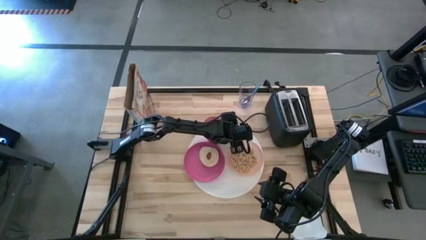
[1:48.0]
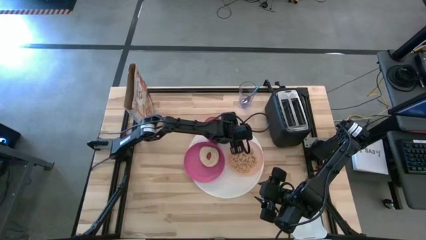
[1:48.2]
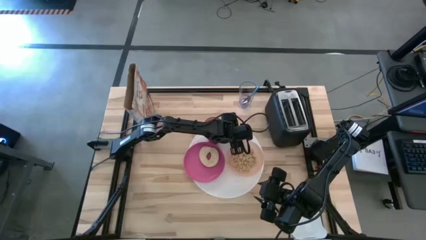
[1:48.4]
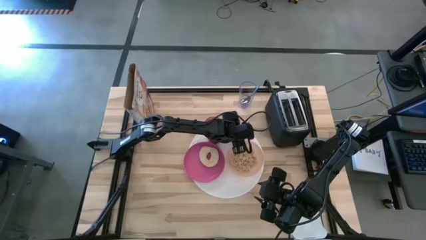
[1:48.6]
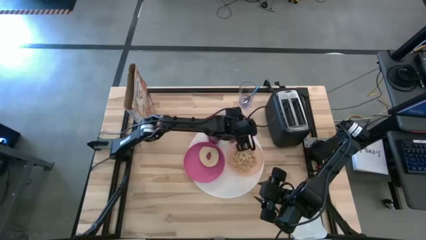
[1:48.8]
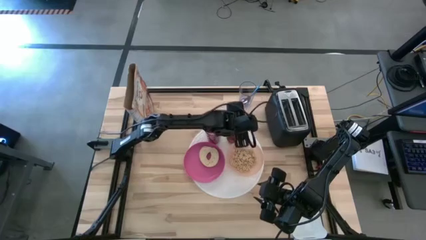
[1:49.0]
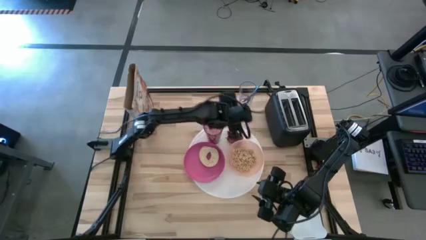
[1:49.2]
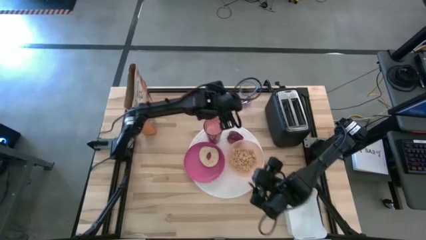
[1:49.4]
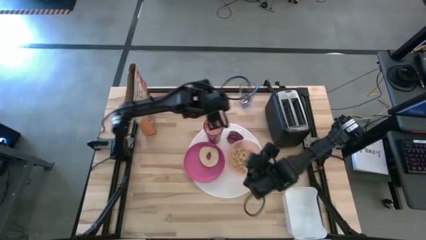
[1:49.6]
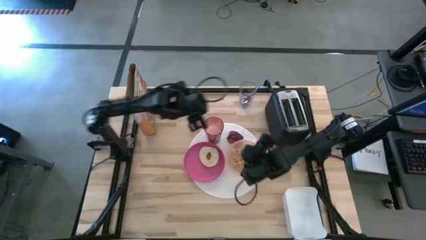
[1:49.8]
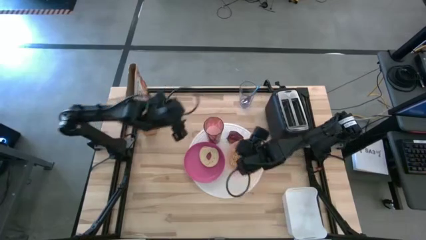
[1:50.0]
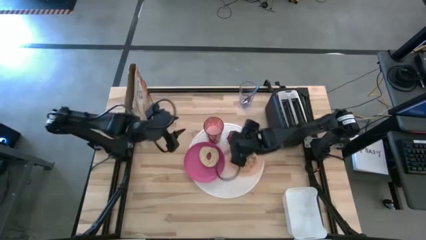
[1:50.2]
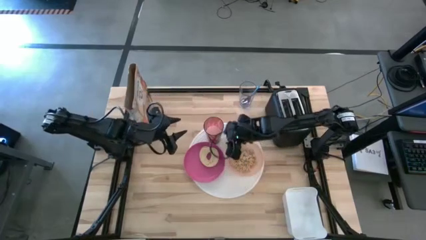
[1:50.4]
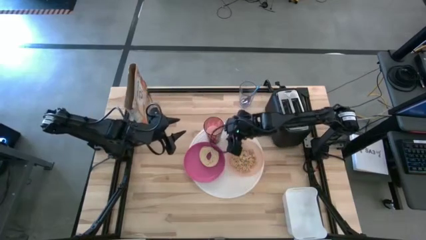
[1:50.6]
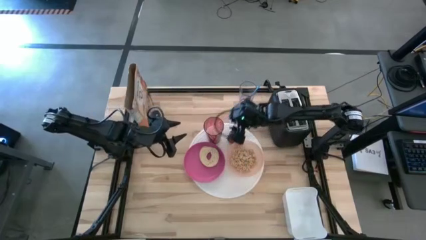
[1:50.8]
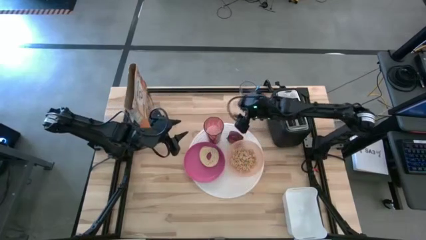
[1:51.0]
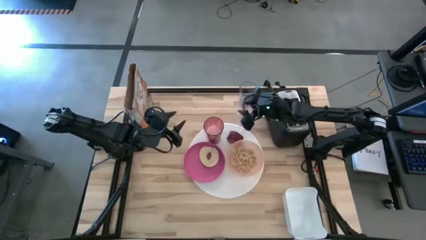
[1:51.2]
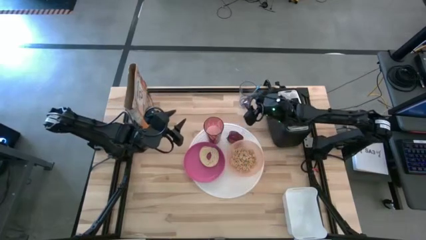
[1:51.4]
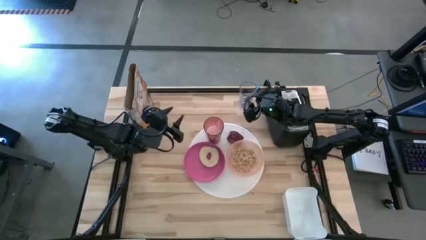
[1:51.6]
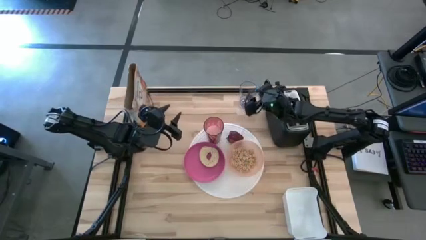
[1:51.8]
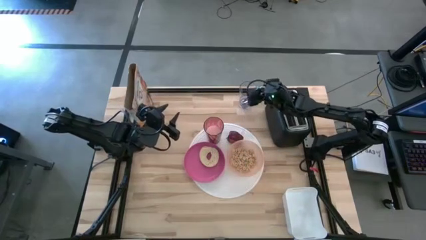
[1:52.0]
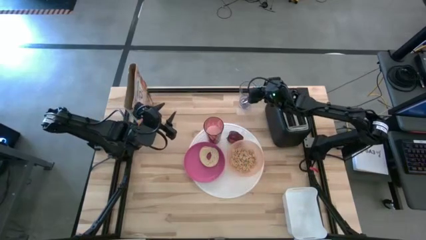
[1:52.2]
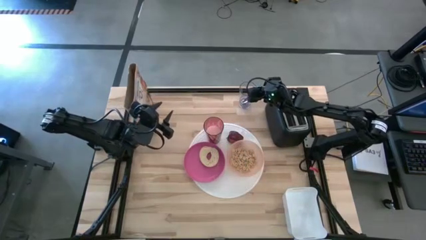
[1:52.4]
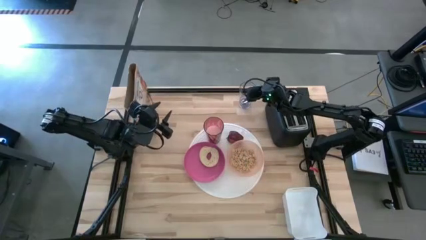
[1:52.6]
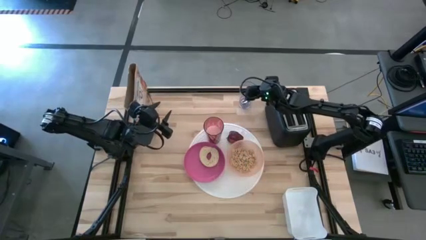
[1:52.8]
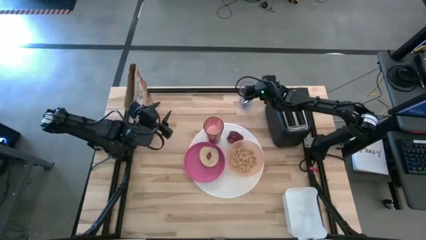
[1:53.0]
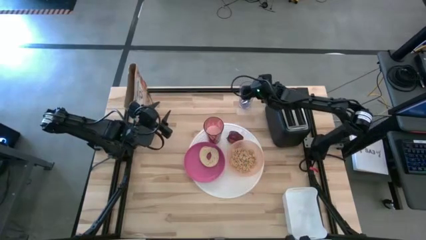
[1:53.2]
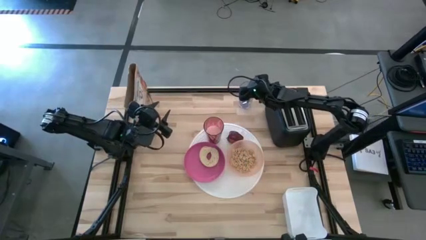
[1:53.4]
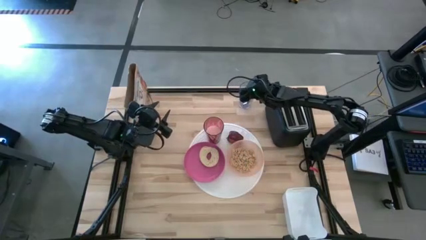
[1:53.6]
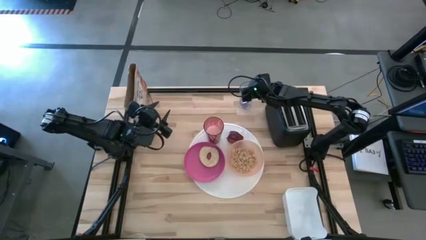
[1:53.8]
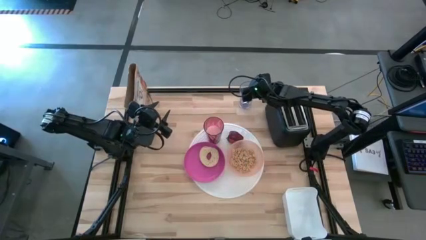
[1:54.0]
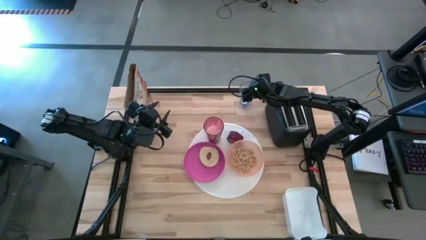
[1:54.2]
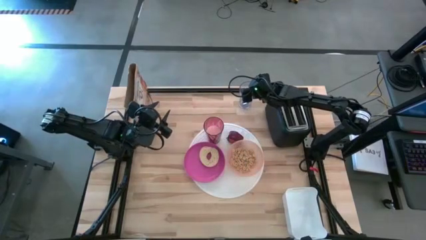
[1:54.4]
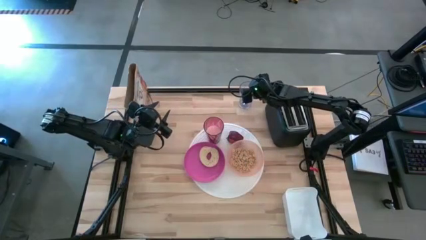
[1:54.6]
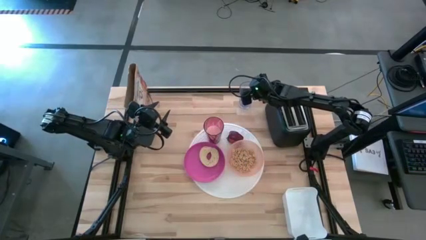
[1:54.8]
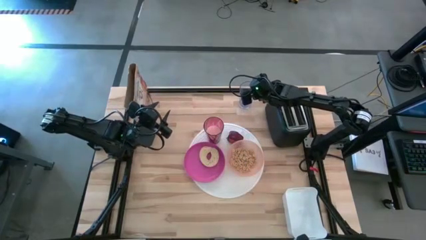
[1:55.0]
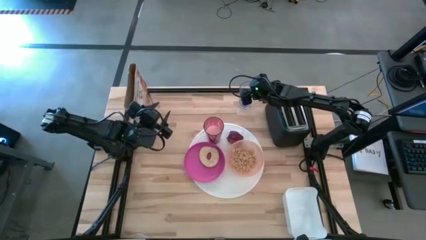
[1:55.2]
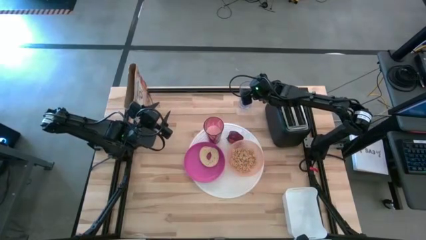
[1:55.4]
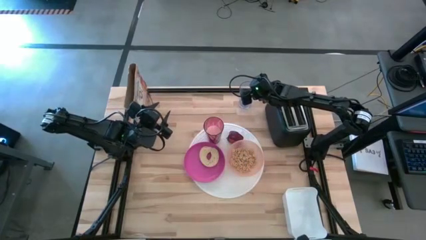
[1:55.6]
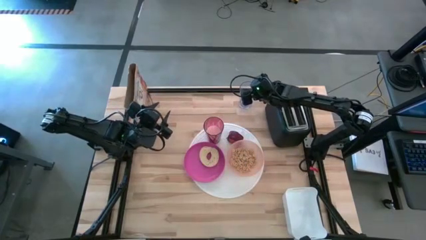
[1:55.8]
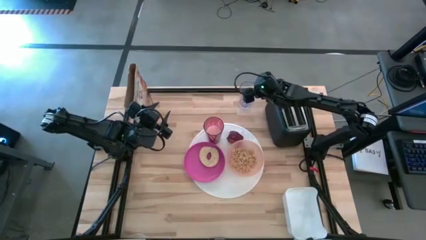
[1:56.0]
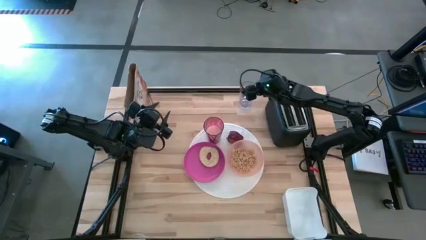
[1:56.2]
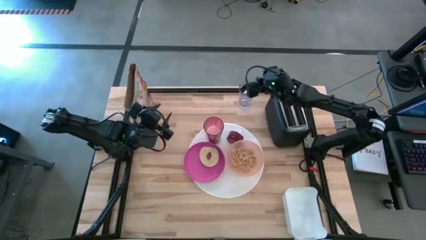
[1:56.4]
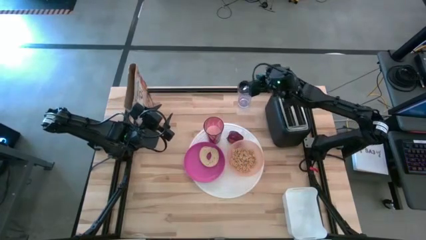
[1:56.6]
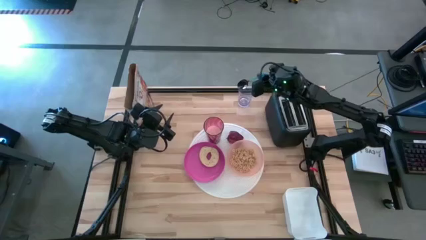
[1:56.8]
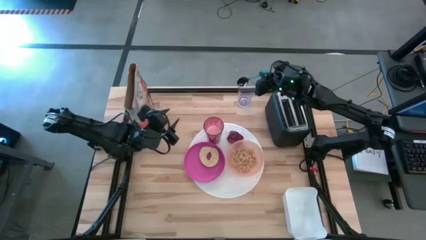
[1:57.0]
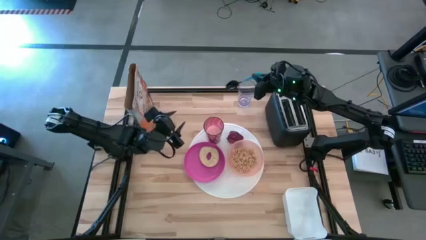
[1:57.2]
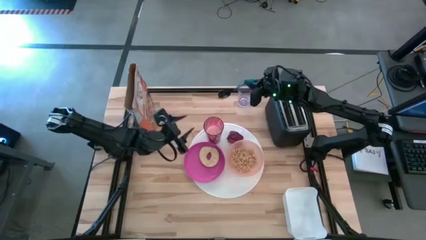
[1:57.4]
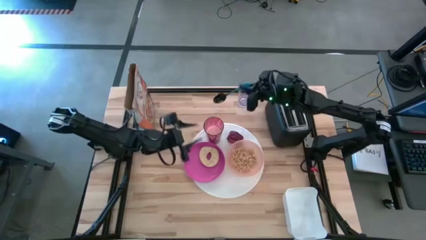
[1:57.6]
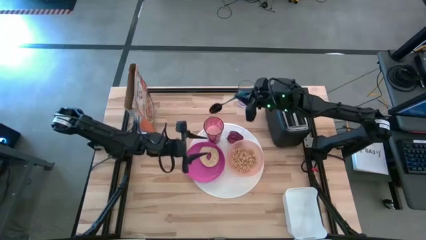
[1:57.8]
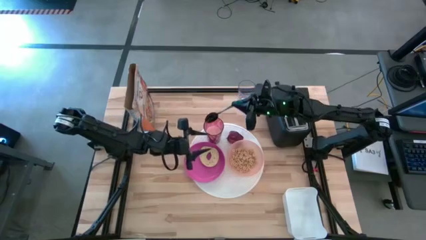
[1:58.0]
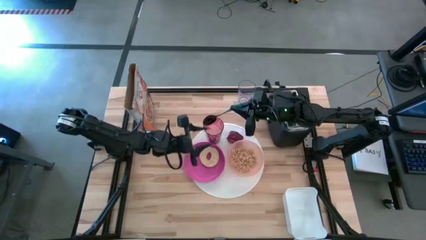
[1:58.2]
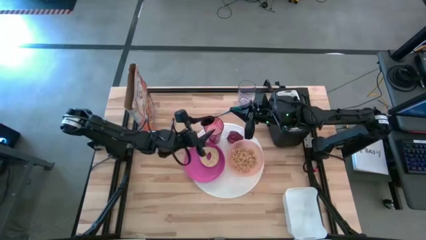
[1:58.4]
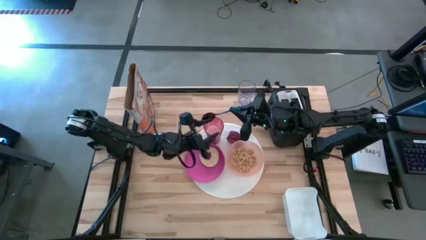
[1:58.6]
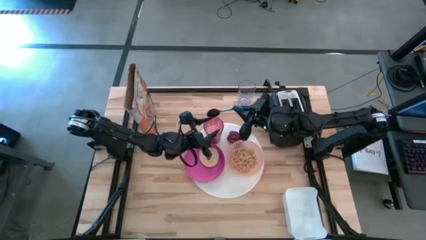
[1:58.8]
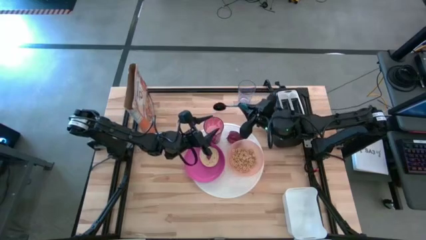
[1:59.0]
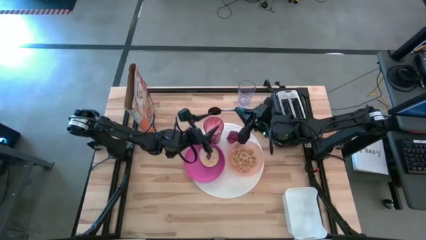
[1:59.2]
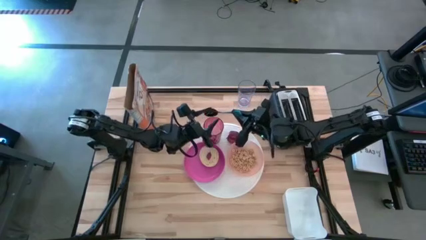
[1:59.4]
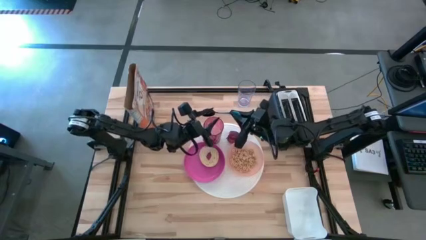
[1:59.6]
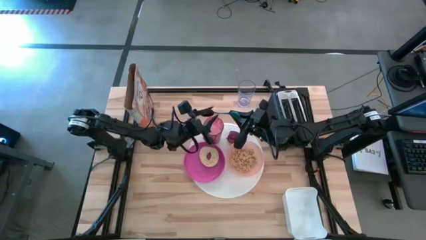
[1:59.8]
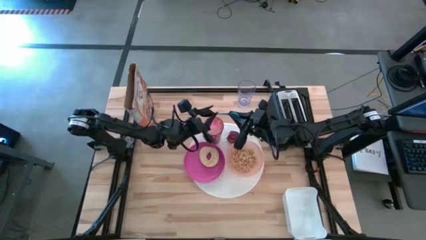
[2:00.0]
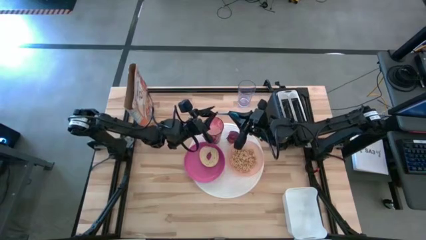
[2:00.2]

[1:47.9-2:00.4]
Task: Arrange a breakfast setting
Put the blue spoon on the white table mat right beside to the light orange bowl
